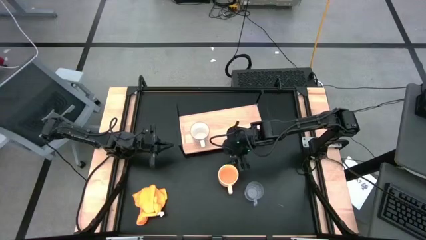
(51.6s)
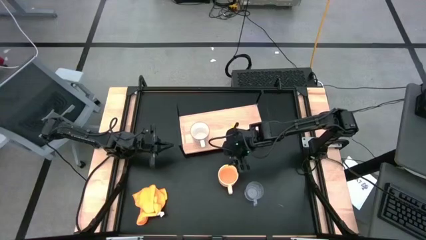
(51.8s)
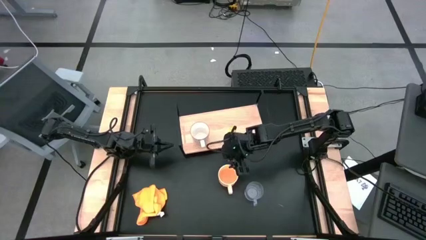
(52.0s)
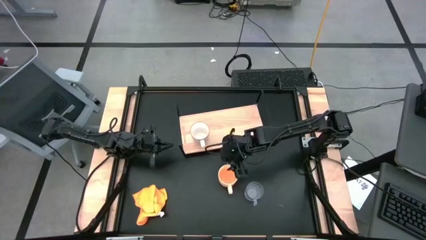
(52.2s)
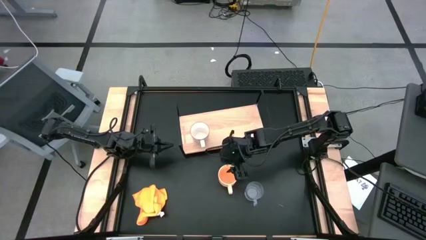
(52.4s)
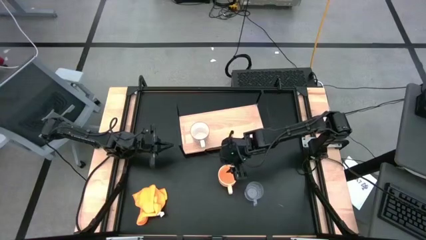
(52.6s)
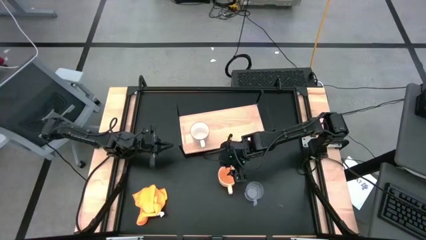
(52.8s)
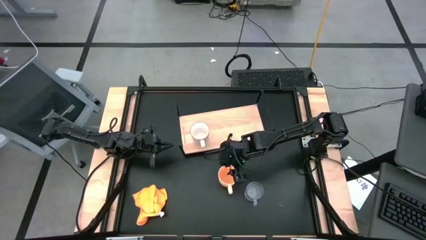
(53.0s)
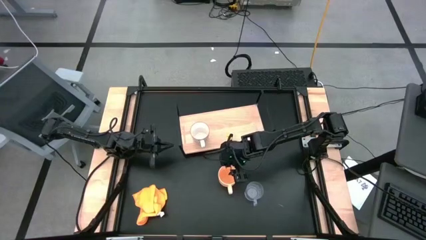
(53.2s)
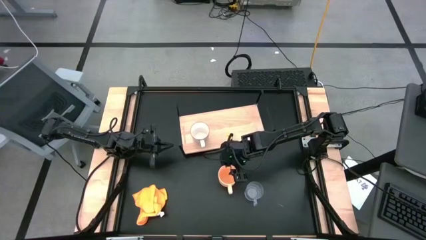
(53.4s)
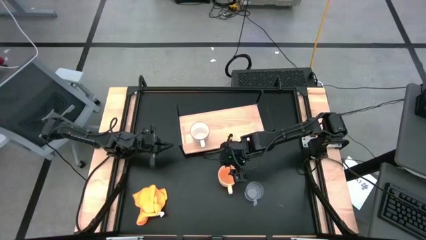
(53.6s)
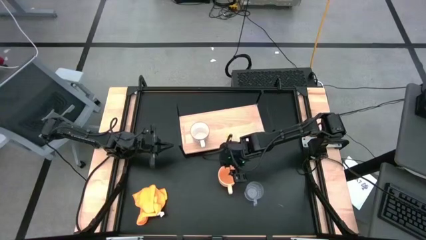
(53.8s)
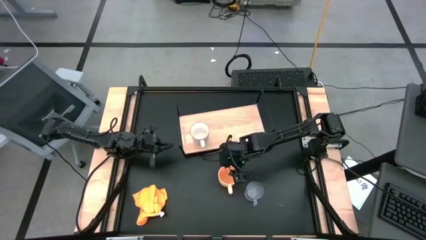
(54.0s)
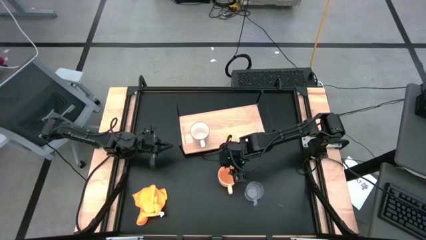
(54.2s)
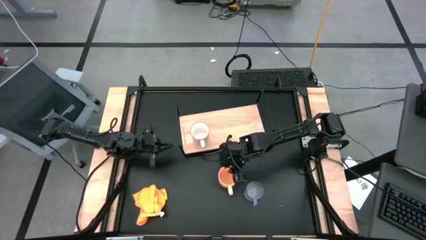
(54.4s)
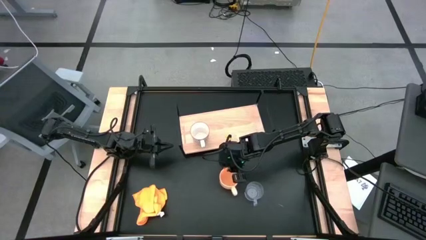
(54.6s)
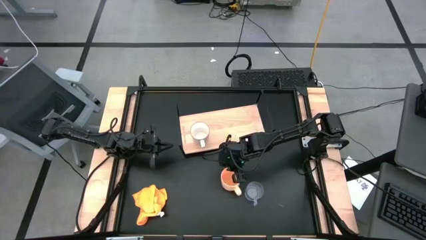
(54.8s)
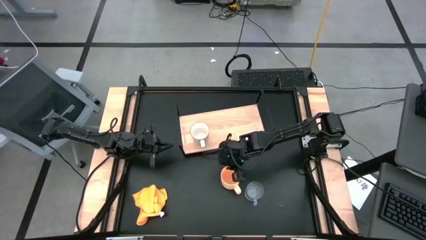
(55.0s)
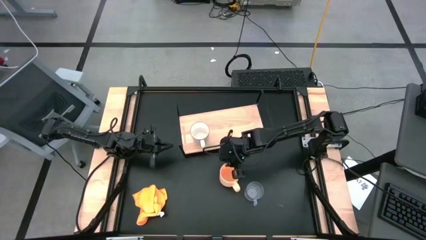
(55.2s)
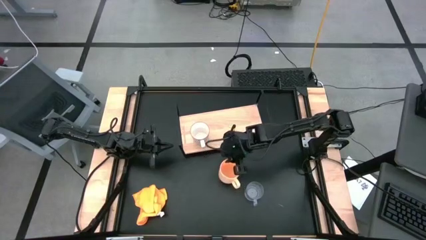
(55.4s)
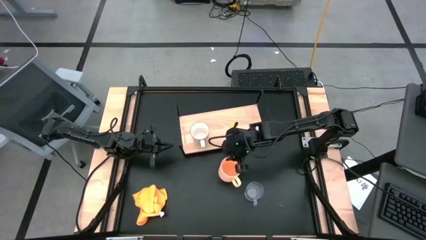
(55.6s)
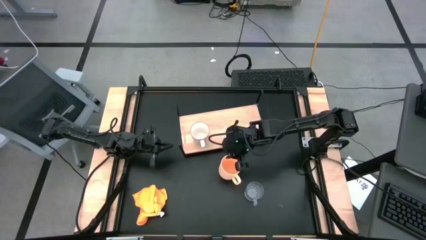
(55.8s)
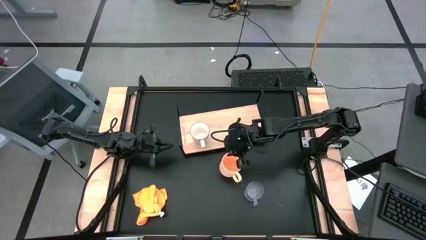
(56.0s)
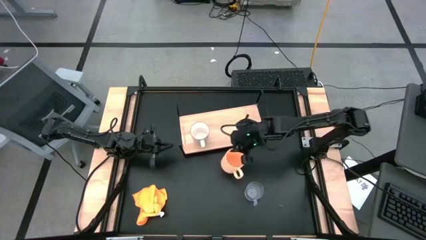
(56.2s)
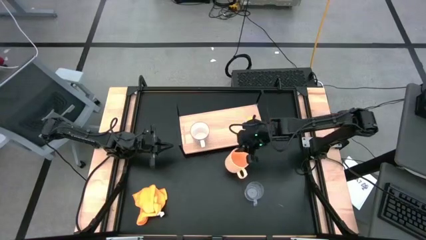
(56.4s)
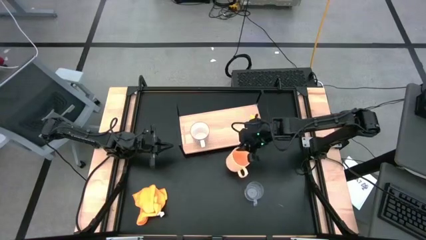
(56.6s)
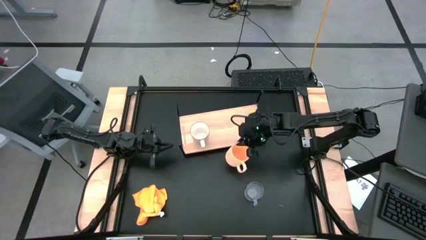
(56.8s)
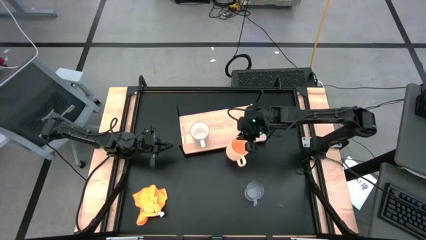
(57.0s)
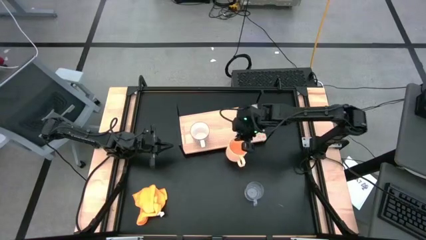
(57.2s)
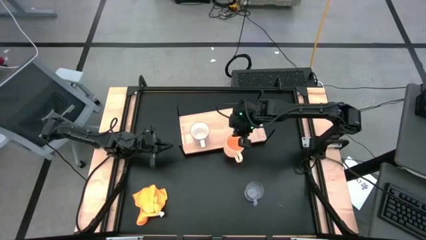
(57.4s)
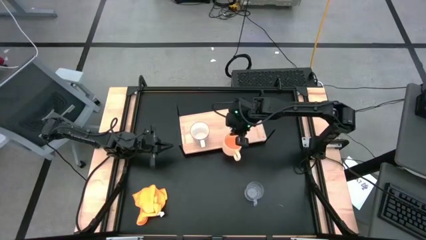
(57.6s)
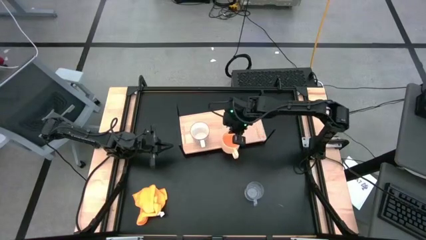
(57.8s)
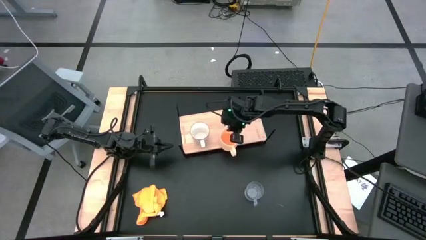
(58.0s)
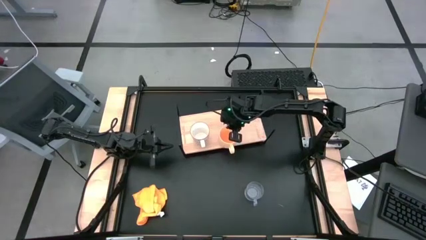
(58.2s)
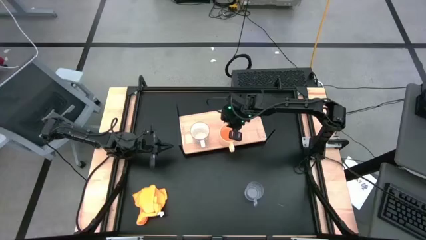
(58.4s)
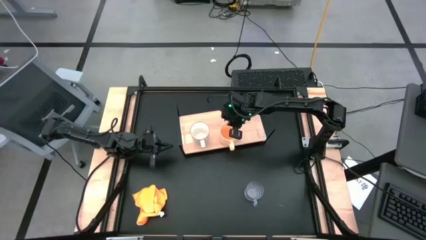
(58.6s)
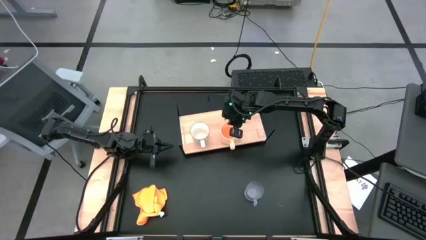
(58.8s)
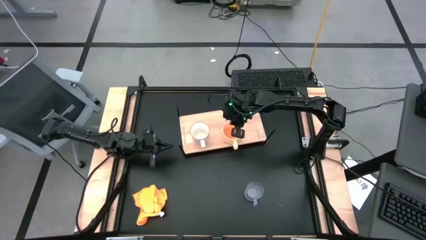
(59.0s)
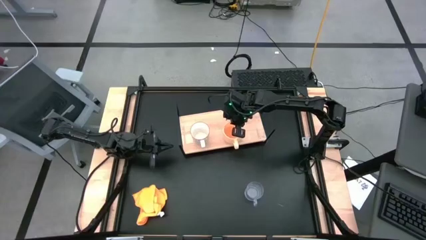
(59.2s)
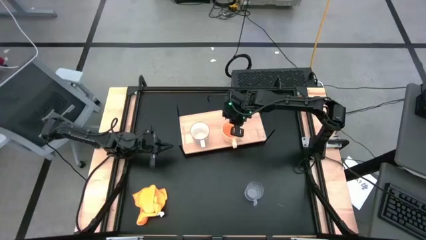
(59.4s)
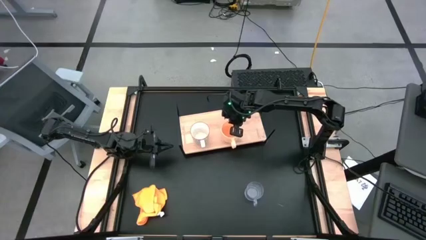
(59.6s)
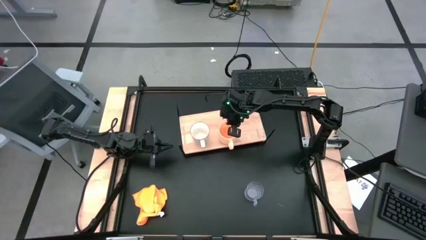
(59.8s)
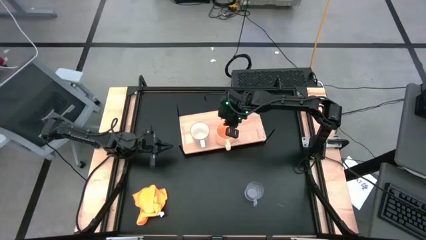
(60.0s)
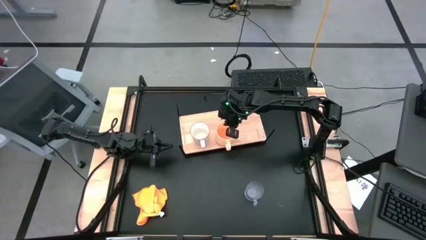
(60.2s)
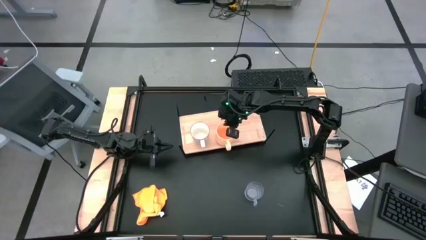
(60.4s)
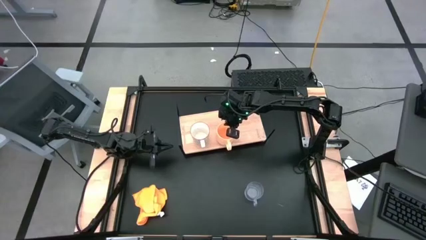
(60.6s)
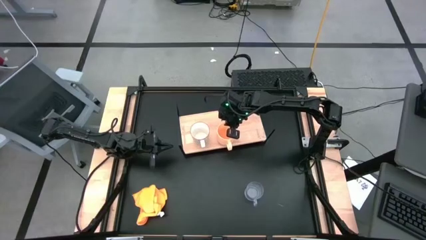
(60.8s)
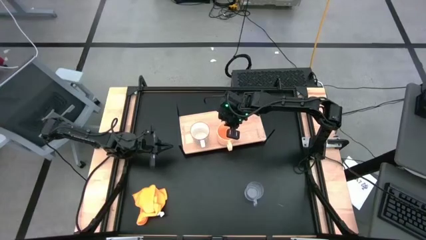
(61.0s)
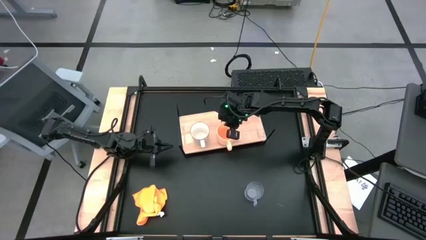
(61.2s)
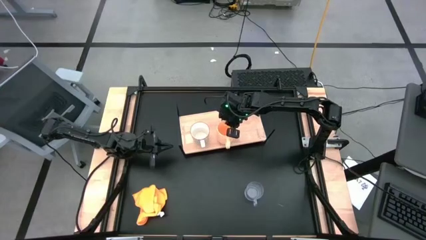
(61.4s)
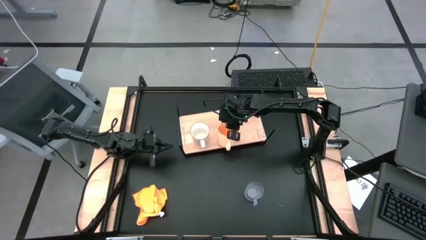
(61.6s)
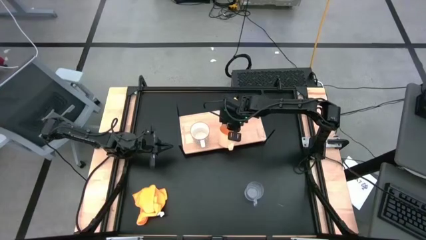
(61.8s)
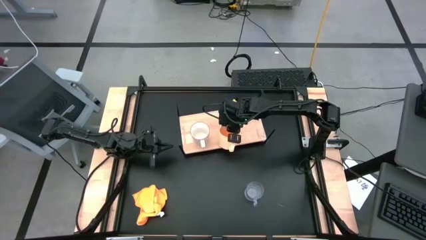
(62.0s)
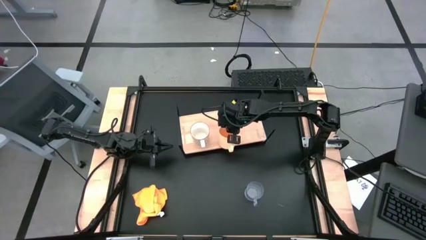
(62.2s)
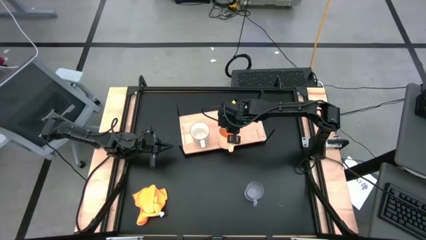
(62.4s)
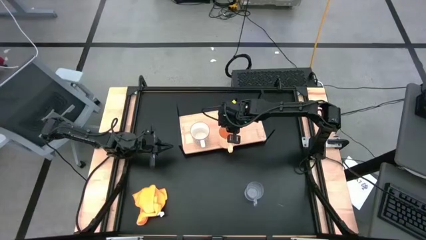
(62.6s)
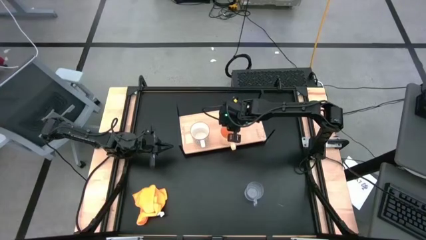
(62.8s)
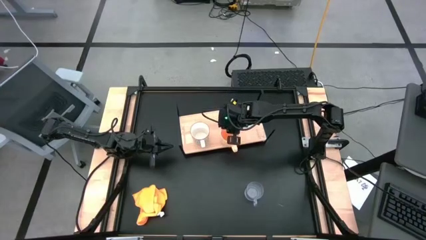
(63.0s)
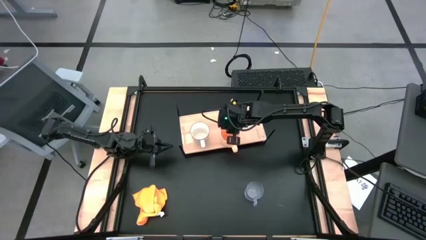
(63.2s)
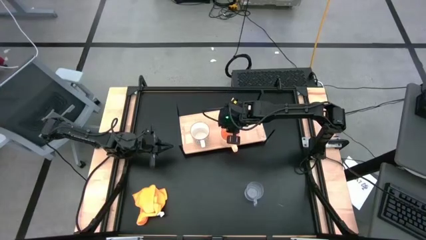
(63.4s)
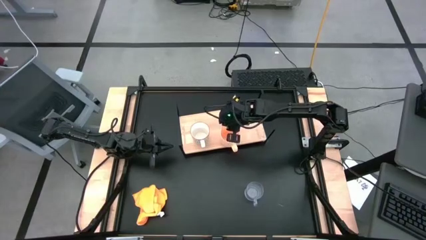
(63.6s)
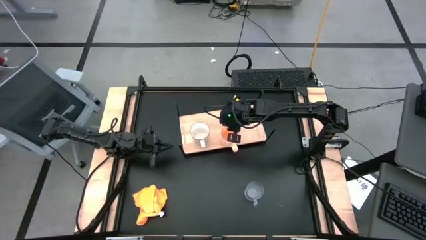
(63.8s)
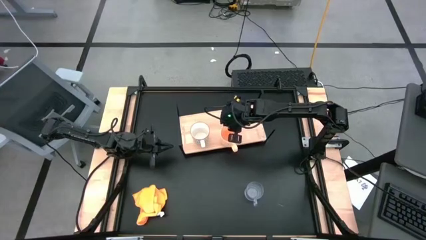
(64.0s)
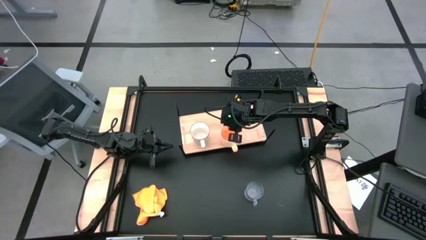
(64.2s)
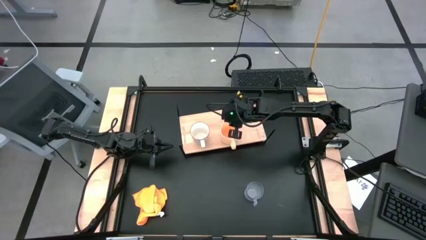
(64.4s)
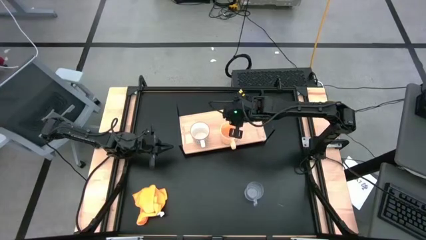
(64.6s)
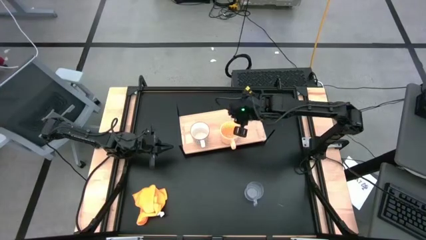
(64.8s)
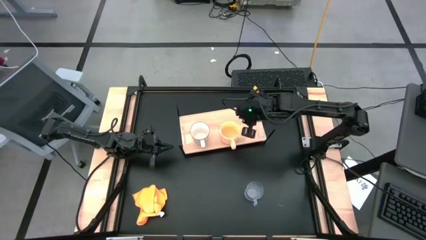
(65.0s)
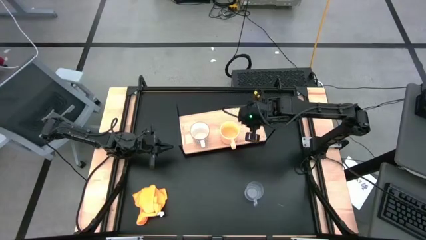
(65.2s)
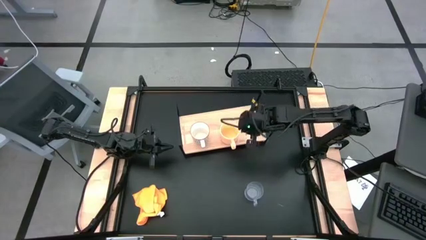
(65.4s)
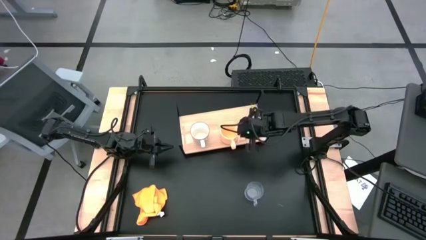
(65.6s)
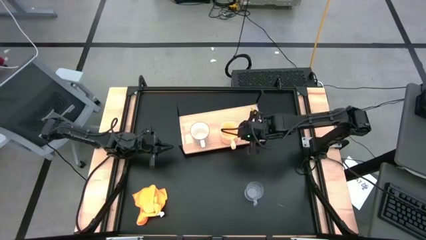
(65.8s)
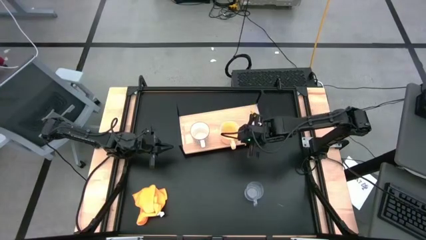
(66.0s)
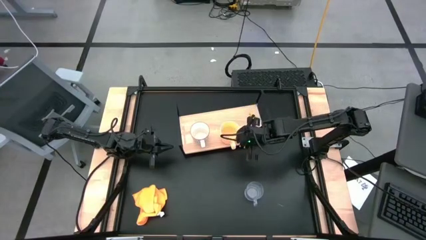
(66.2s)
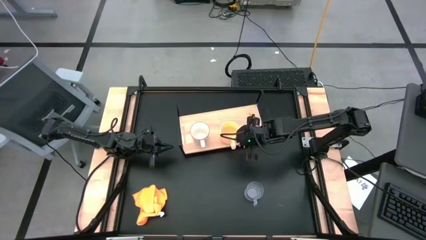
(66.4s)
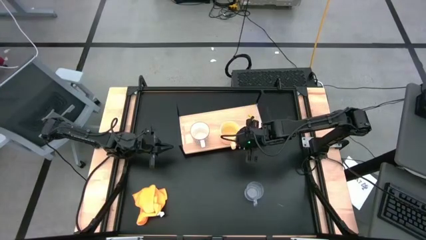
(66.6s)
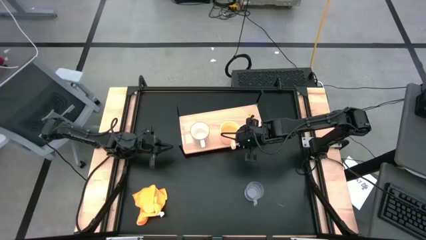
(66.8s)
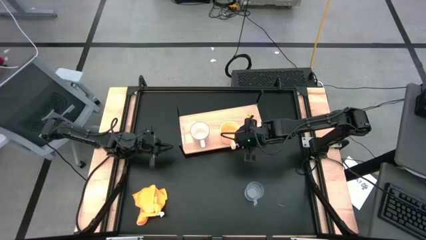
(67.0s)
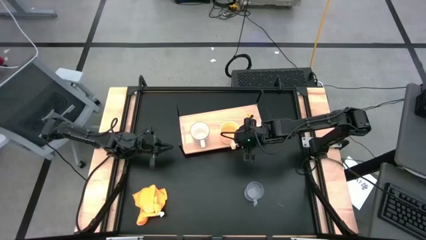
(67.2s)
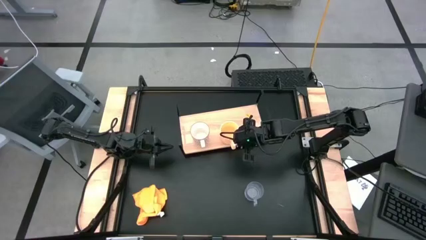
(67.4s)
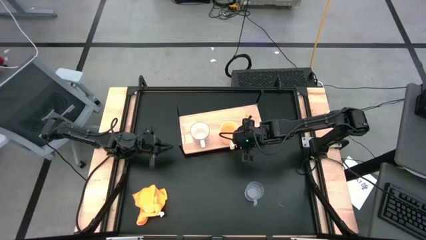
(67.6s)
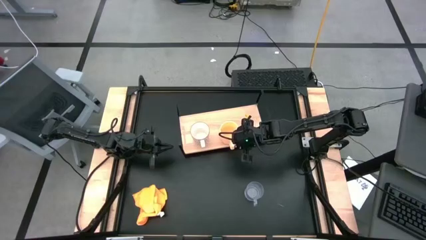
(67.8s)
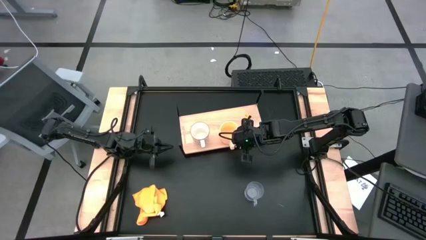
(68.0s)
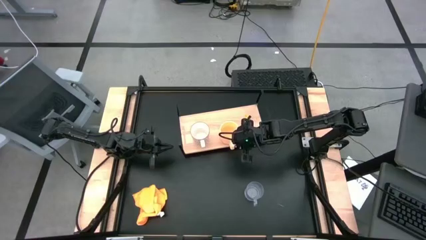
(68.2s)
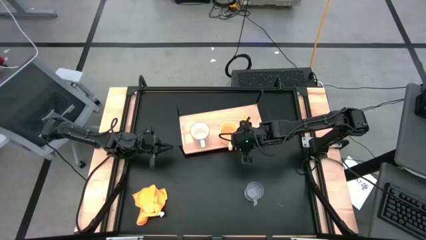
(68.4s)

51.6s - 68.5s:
Task: Stack small to large cups/mugs on shelf
Put the yellow mug on the shelf
